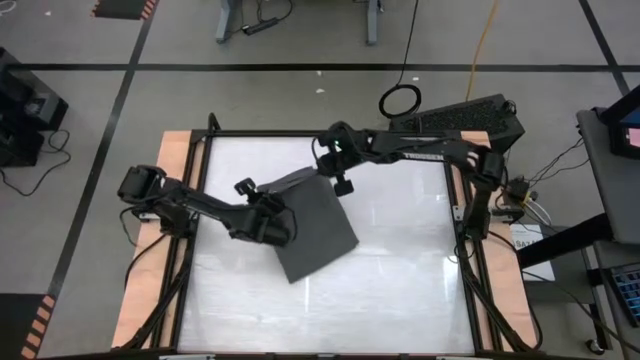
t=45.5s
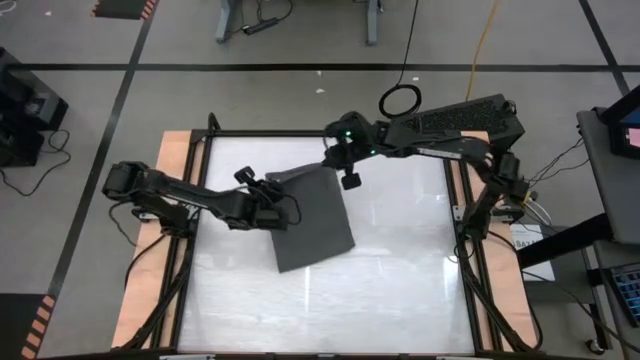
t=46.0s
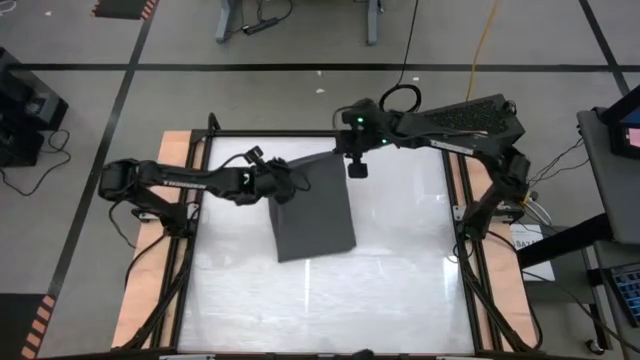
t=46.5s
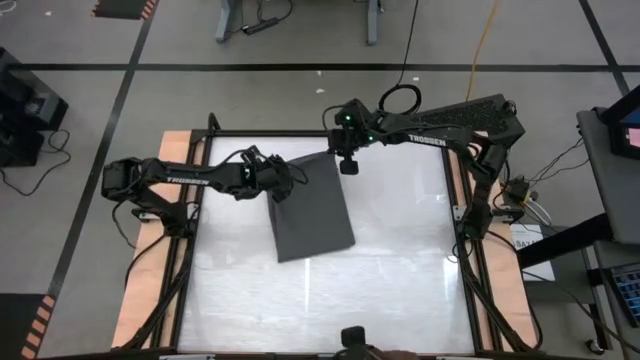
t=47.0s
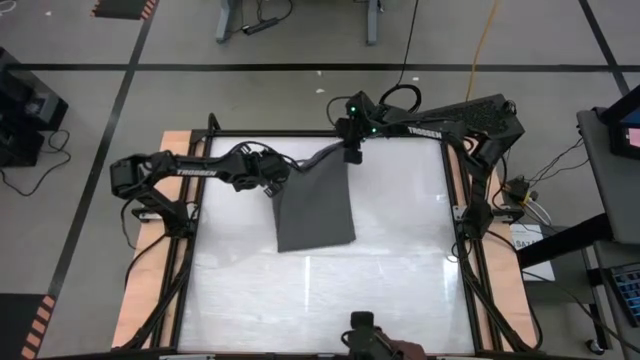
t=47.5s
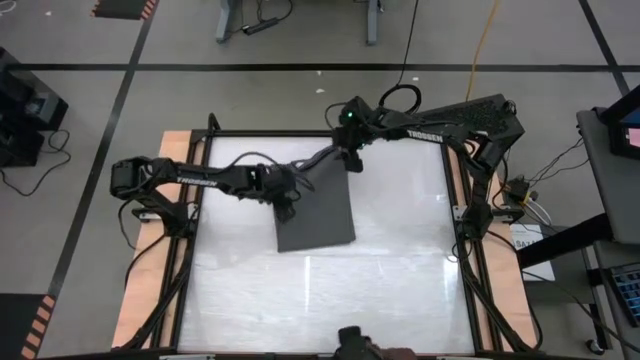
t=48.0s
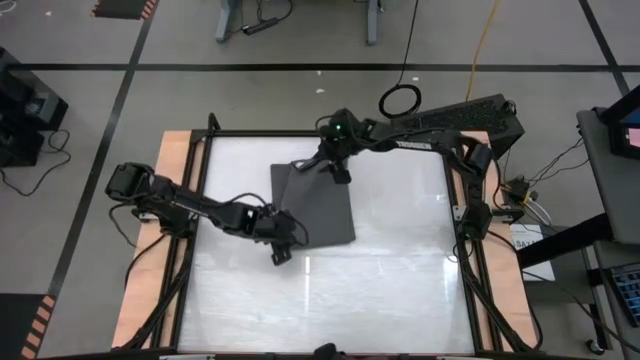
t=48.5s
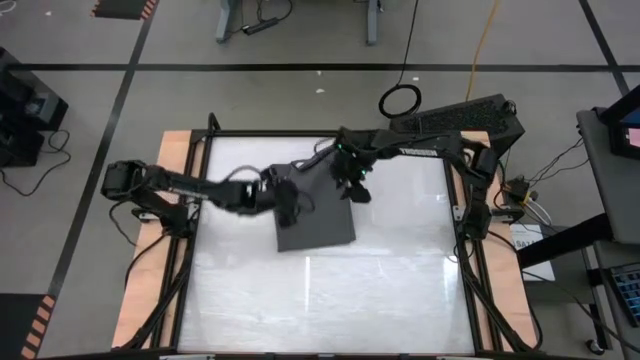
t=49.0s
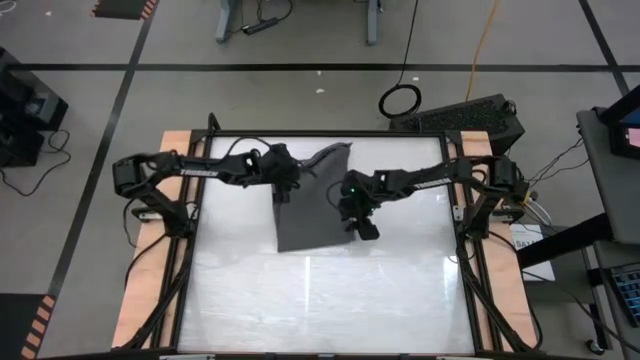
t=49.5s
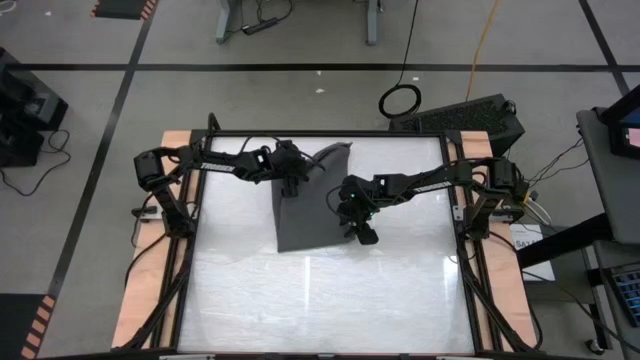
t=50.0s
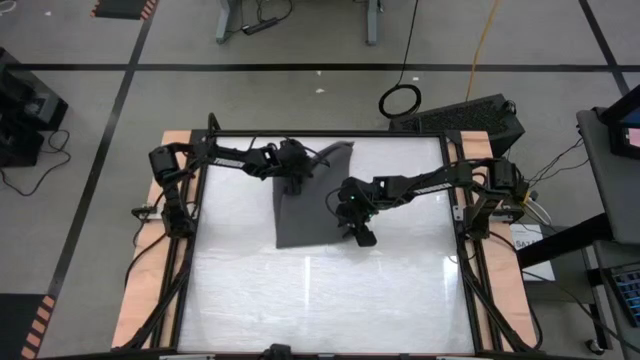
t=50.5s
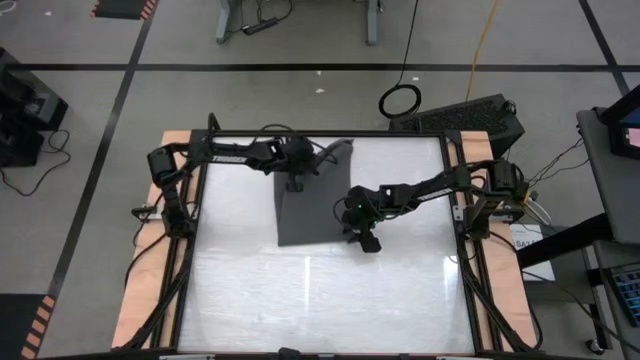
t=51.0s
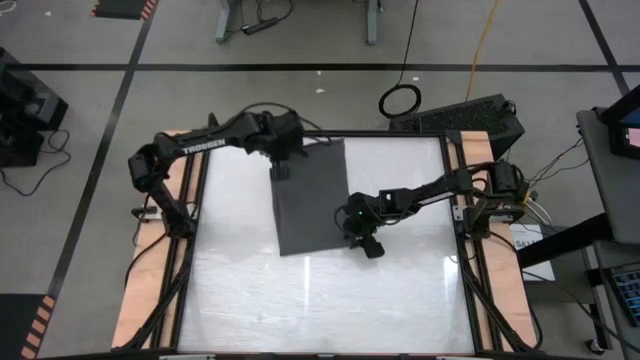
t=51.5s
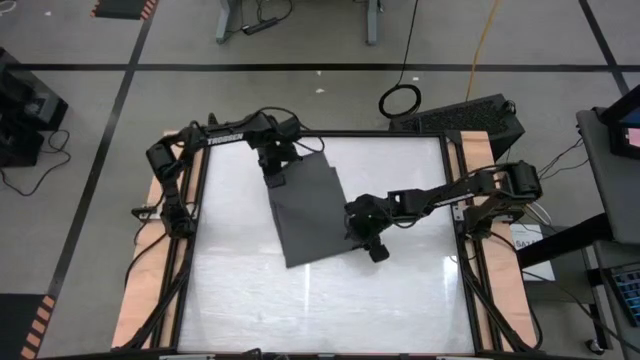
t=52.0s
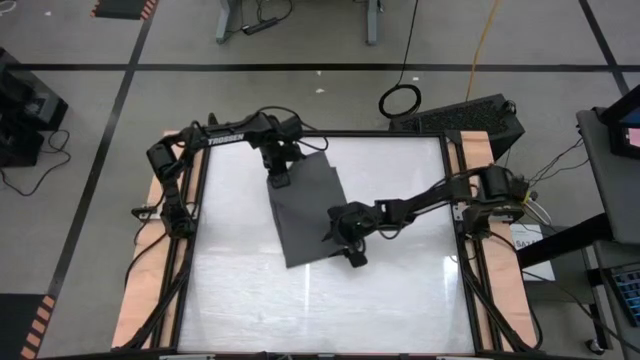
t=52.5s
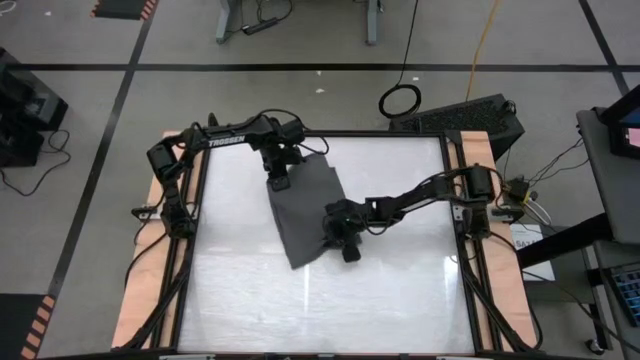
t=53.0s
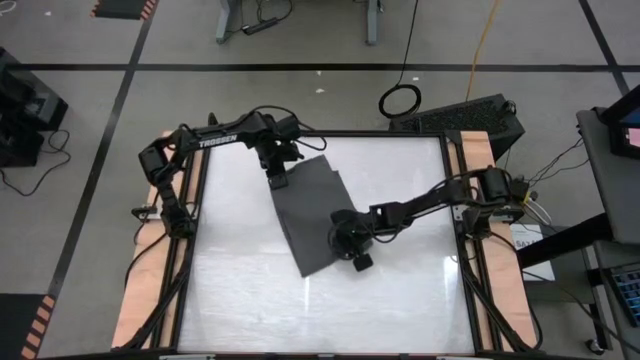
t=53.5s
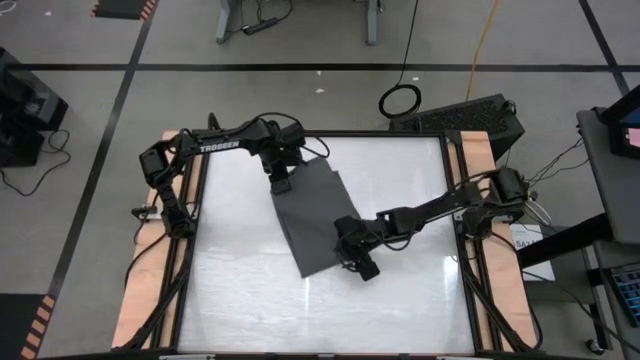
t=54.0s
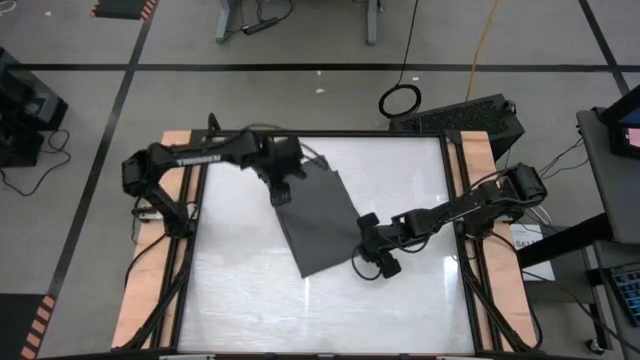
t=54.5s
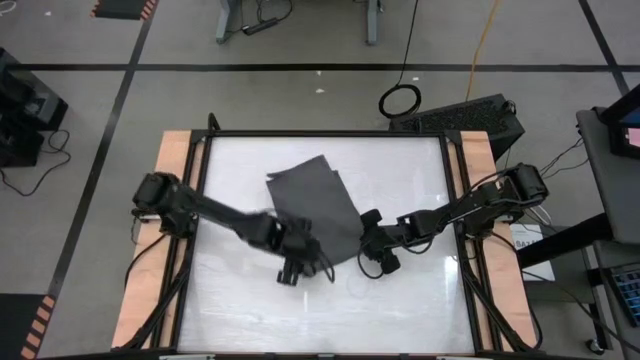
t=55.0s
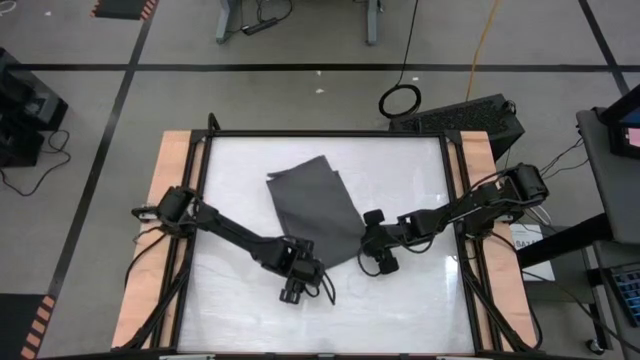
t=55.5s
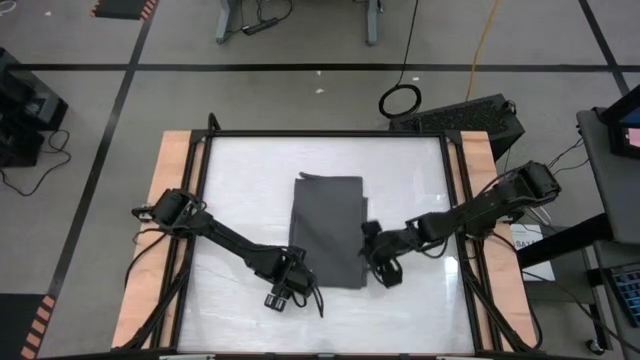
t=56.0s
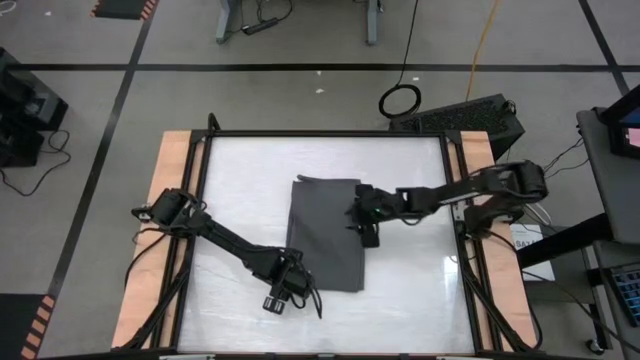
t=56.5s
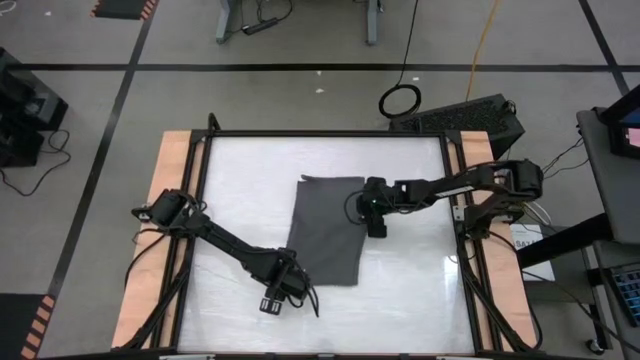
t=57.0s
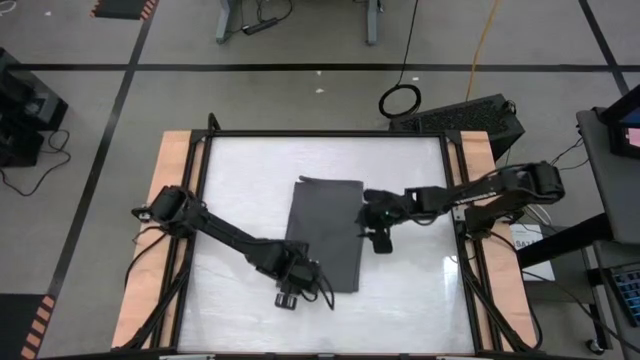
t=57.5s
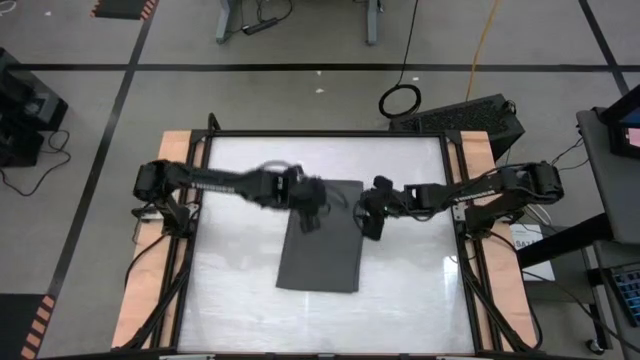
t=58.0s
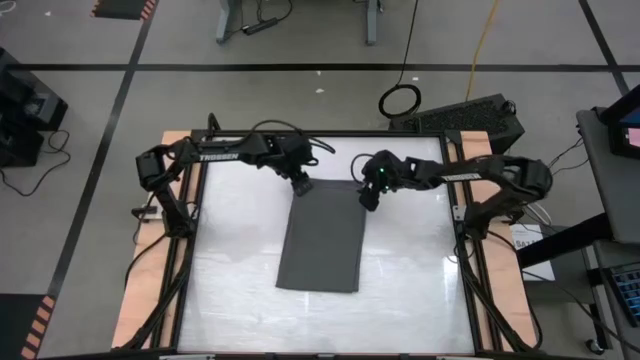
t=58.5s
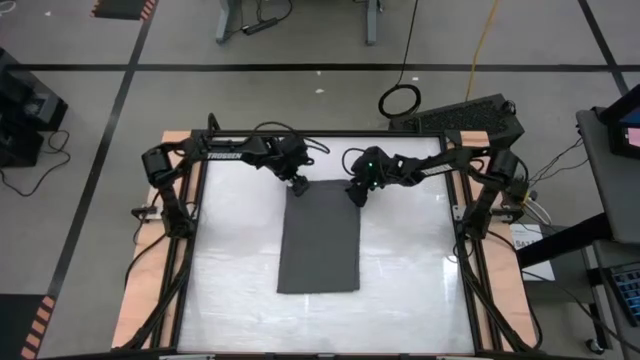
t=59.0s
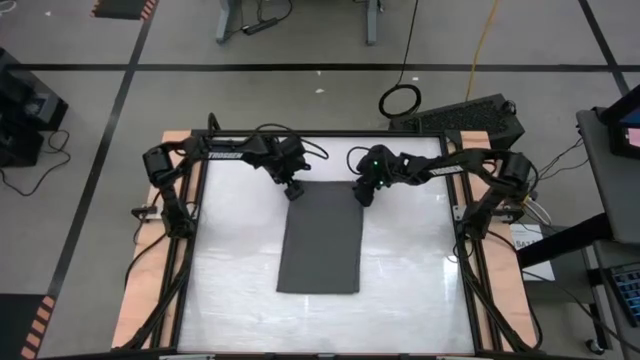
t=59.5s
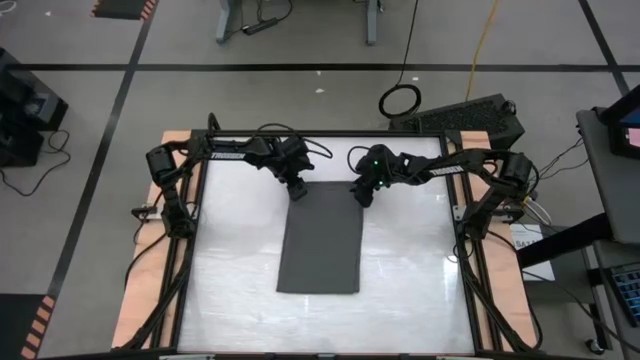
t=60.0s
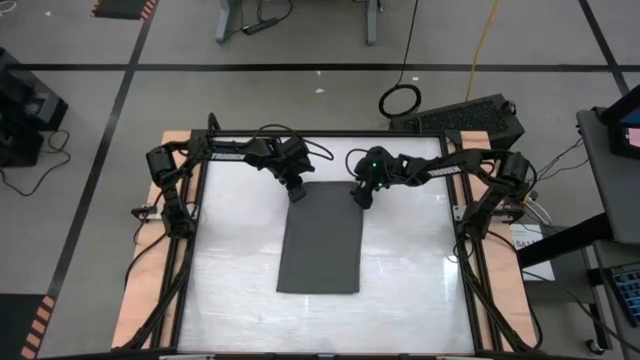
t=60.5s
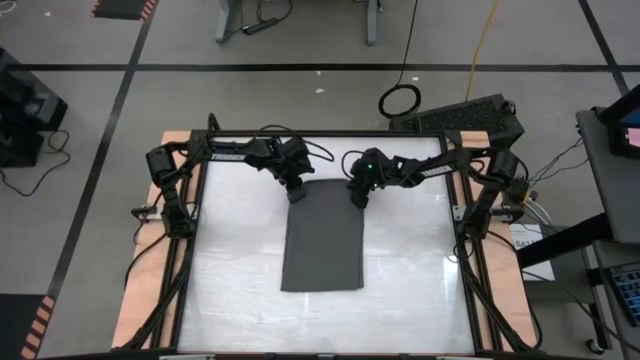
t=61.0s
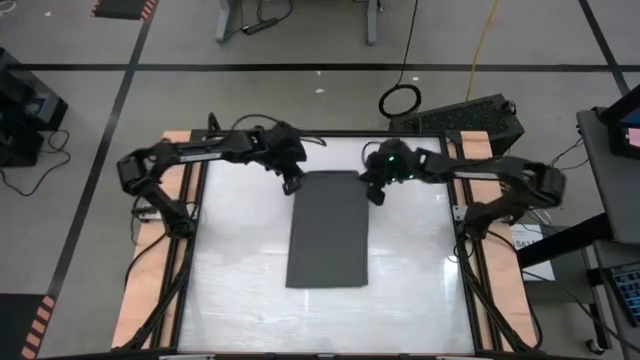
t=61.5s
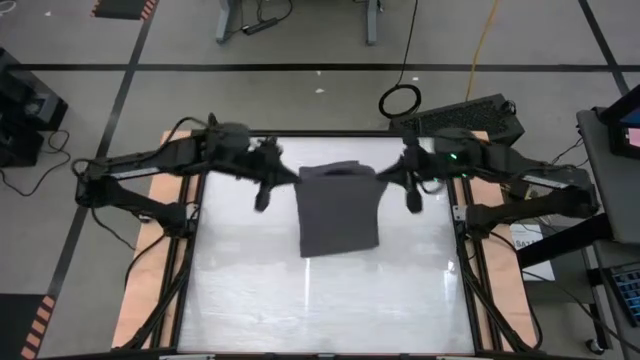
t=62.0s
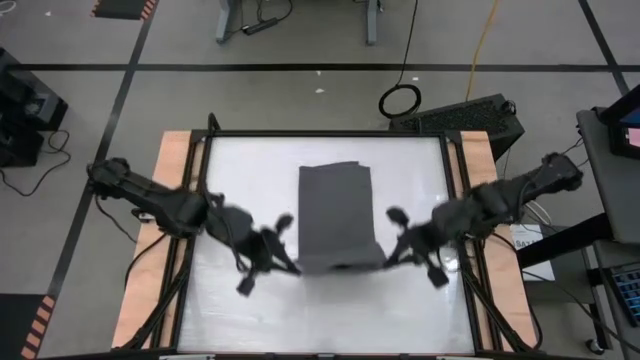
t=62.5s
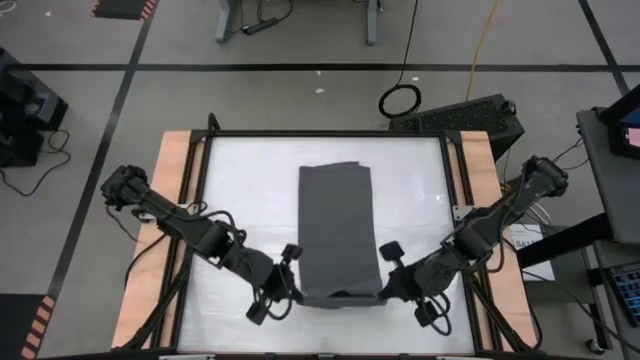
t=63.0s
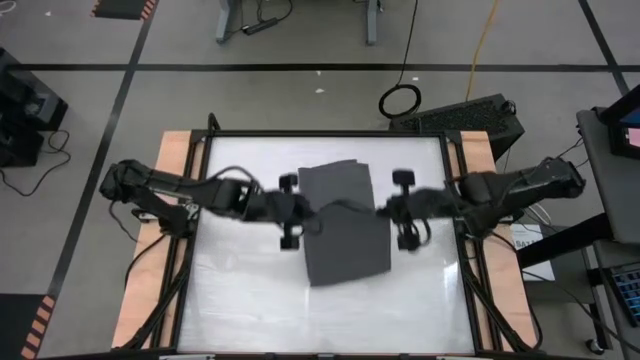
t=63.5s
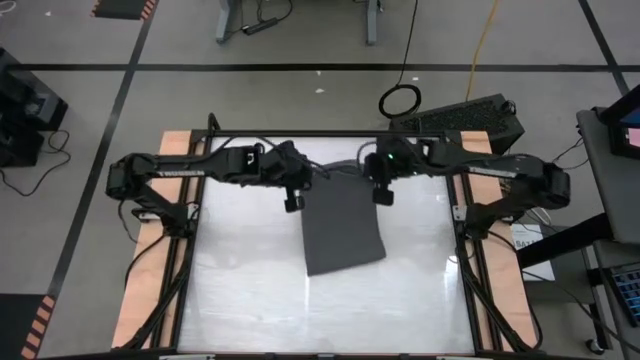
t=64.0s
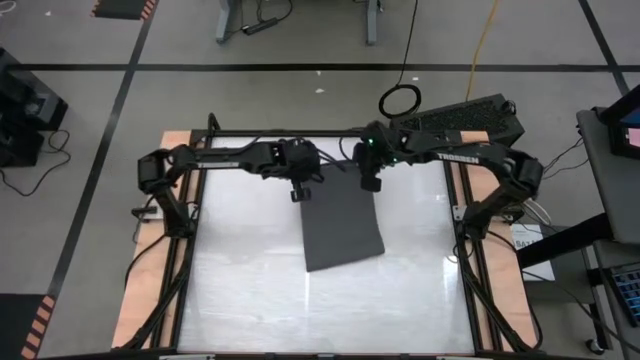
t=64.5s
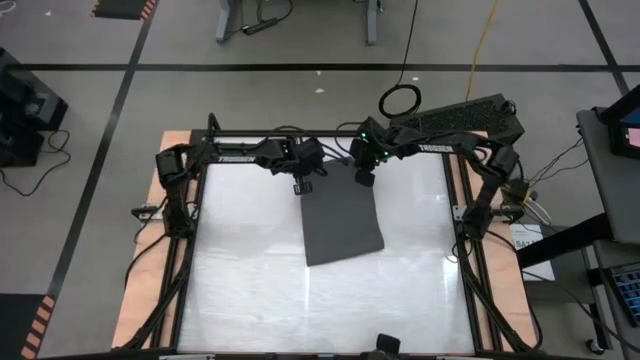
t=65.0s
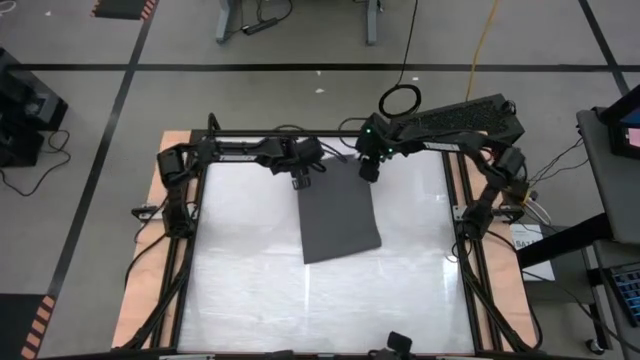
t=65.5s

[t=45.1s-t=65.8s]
Task: Roll towel
Fold the dark gray towel

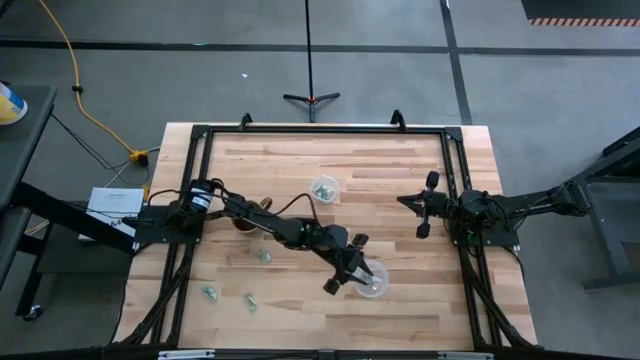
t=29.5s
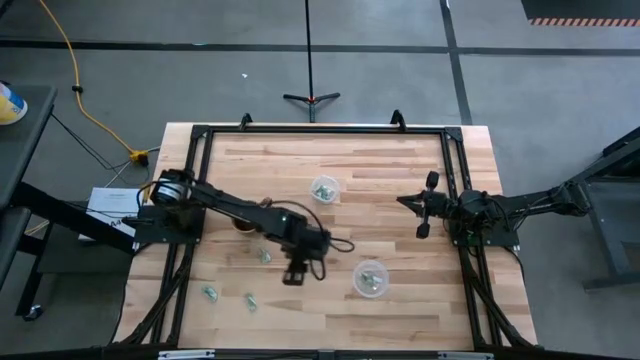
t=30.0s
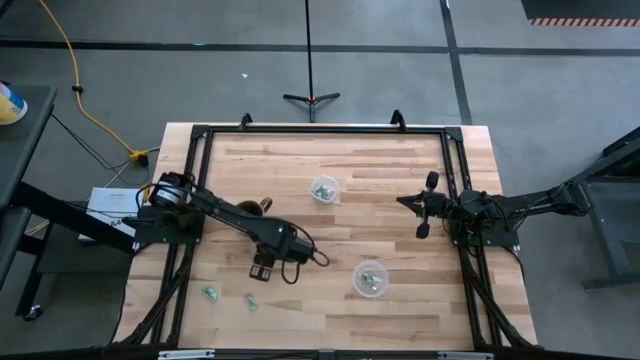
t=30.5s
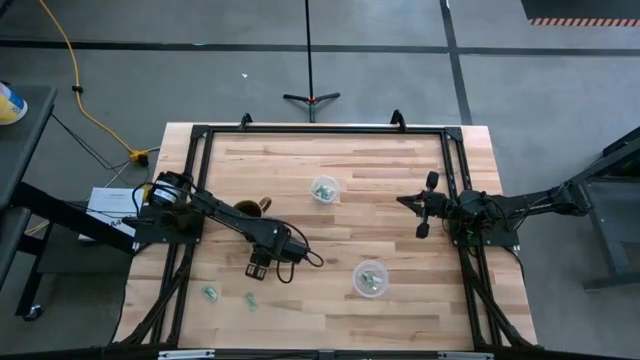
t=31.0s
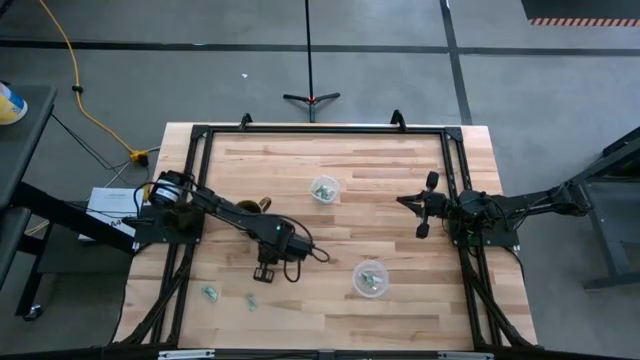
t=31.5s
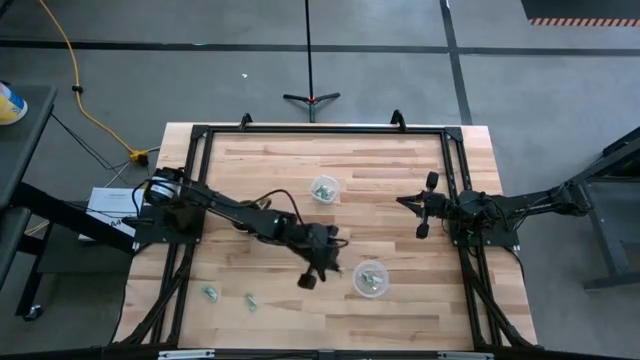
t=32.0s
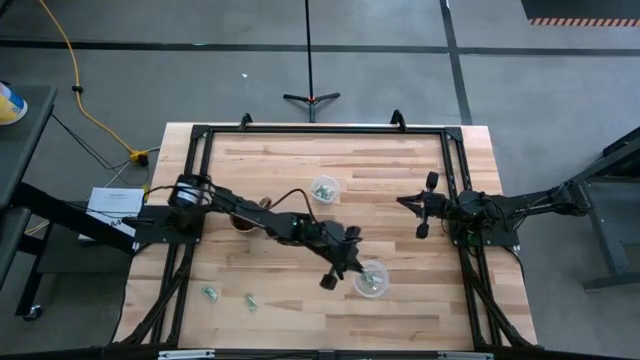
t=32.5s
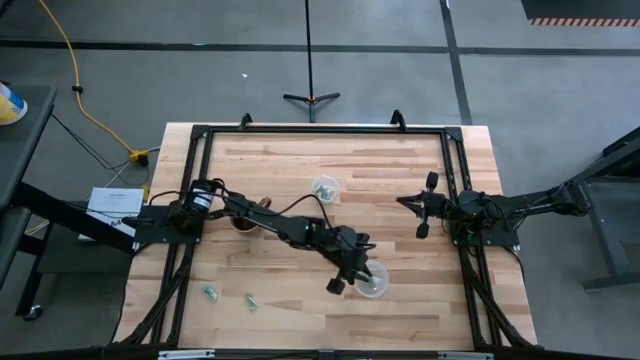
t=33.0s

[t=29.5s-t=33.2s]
Task: Pick and place Stevia / Truvia into bins
Put the stevia packet into the bottom transparent container
